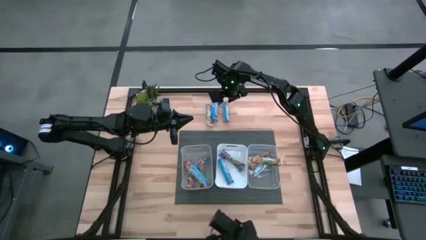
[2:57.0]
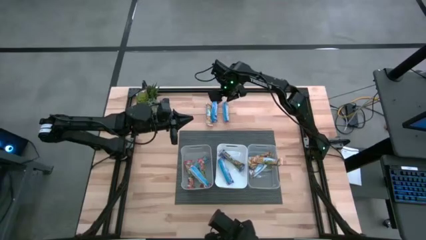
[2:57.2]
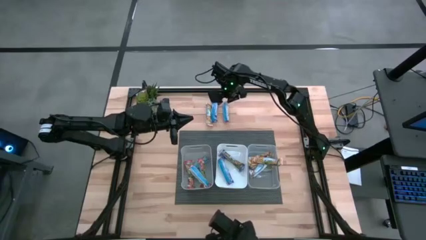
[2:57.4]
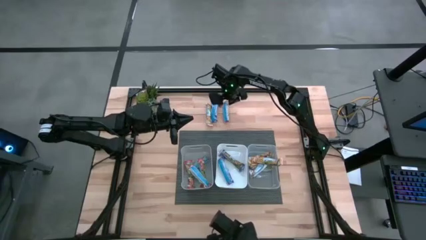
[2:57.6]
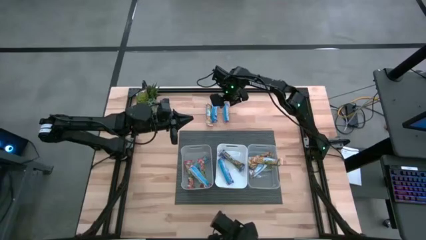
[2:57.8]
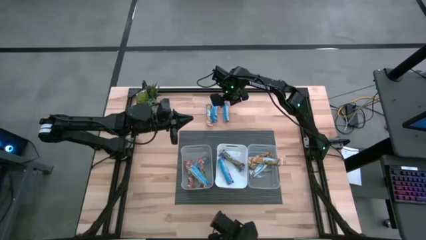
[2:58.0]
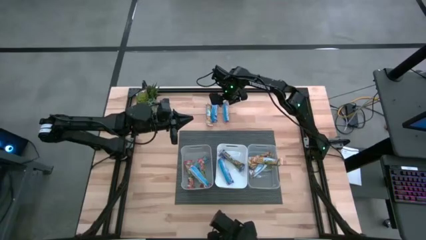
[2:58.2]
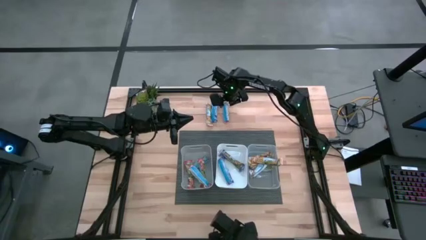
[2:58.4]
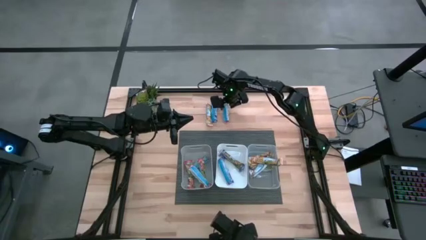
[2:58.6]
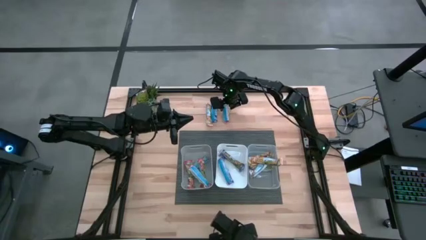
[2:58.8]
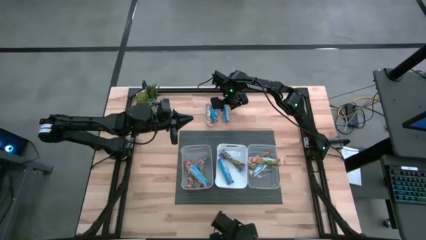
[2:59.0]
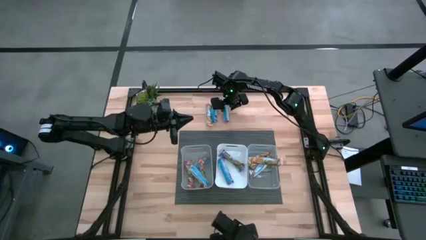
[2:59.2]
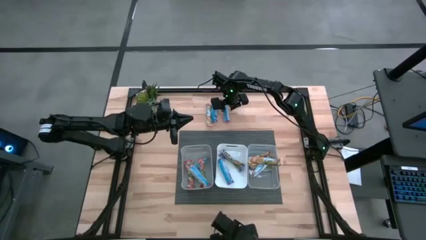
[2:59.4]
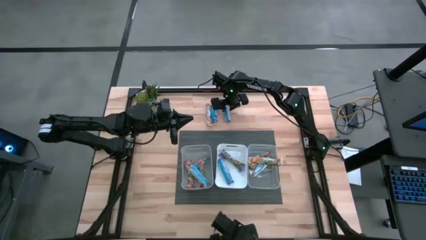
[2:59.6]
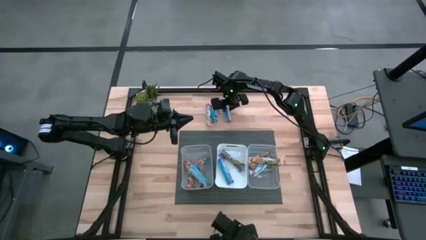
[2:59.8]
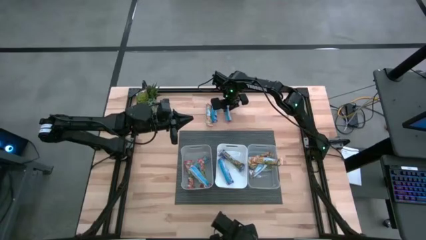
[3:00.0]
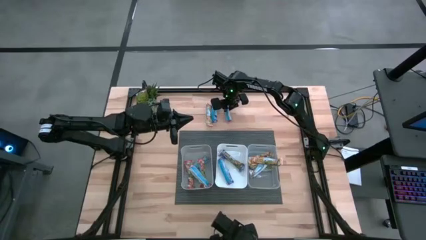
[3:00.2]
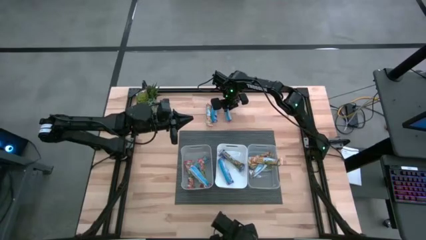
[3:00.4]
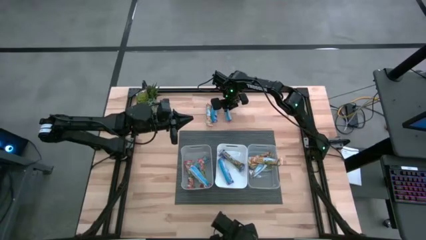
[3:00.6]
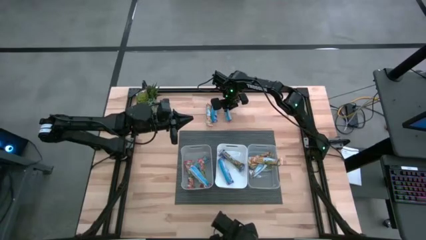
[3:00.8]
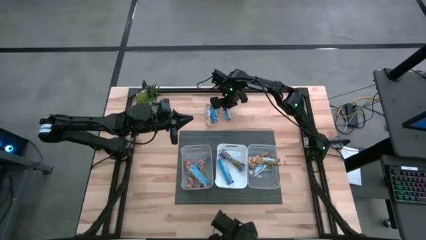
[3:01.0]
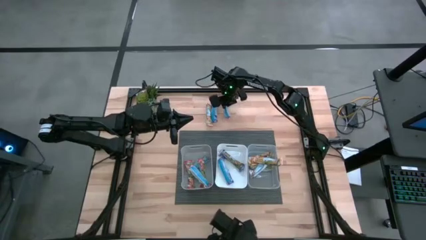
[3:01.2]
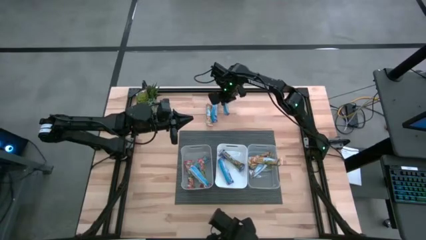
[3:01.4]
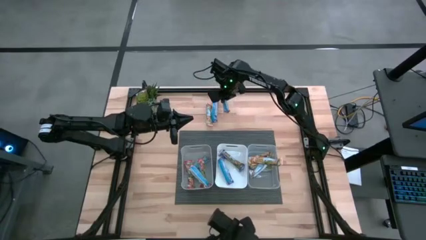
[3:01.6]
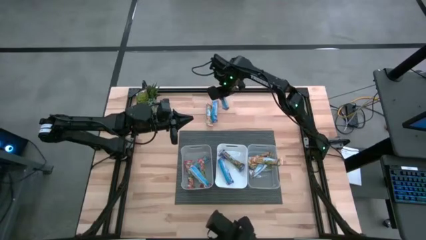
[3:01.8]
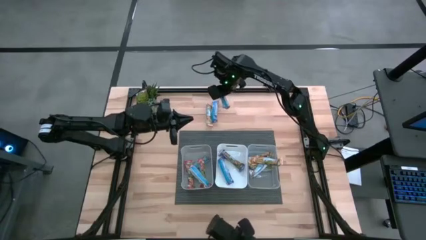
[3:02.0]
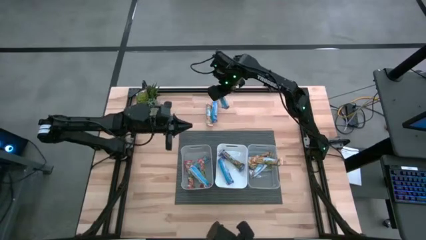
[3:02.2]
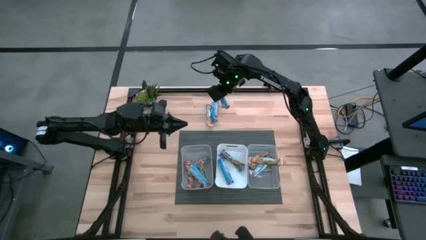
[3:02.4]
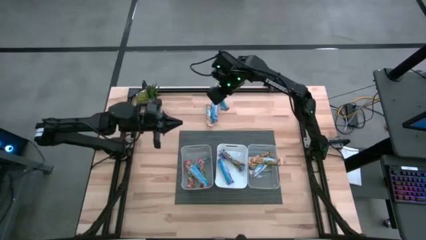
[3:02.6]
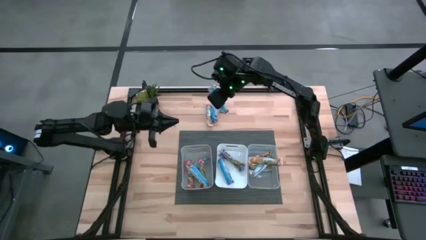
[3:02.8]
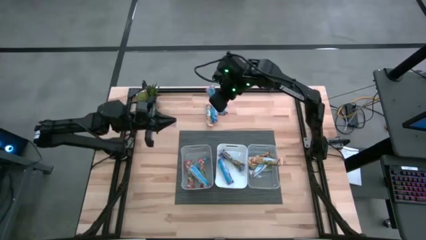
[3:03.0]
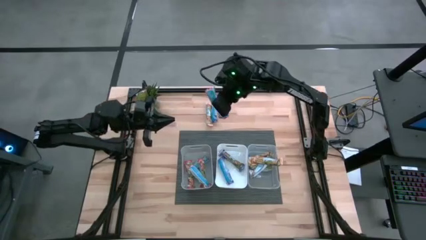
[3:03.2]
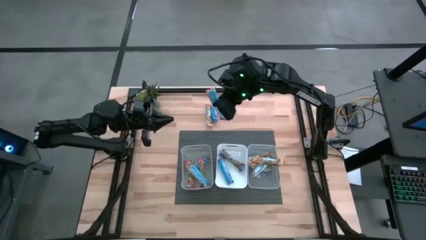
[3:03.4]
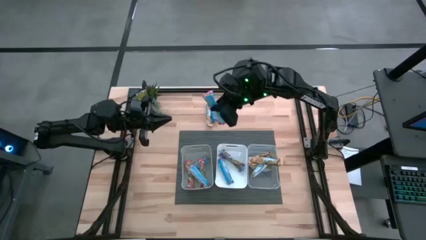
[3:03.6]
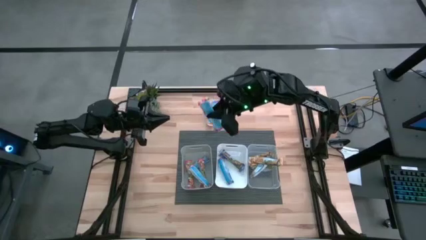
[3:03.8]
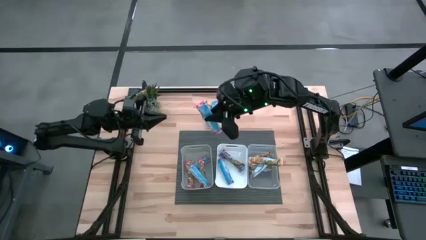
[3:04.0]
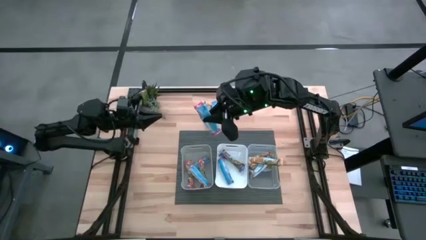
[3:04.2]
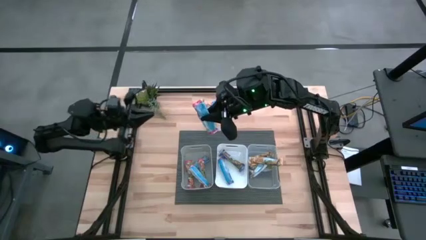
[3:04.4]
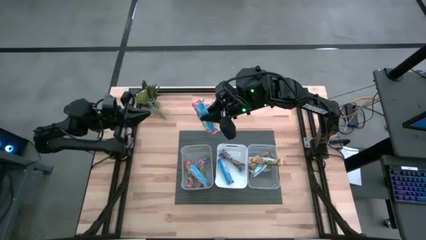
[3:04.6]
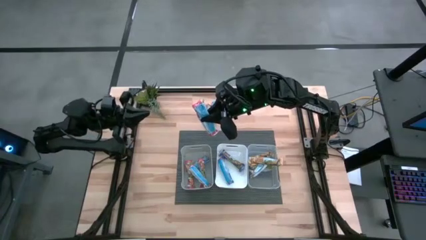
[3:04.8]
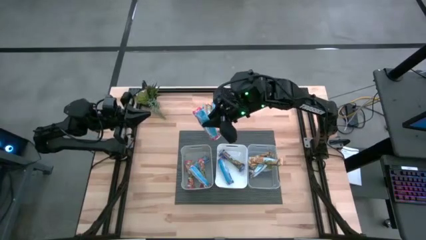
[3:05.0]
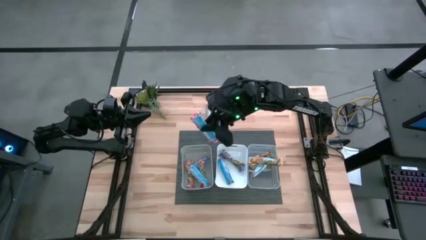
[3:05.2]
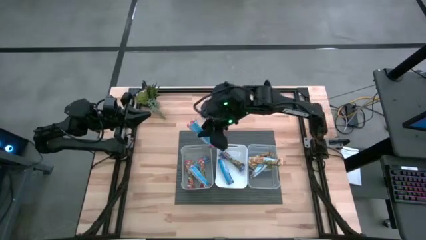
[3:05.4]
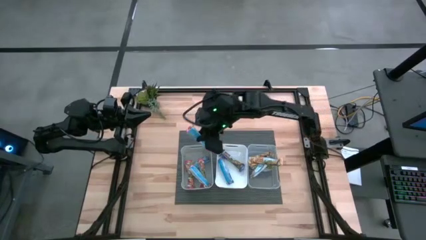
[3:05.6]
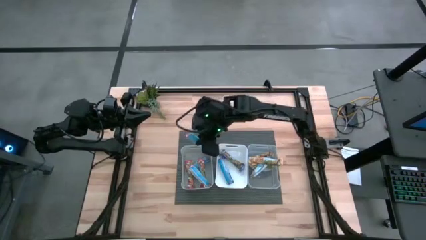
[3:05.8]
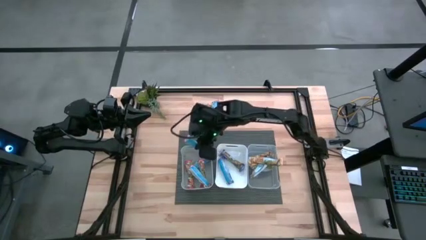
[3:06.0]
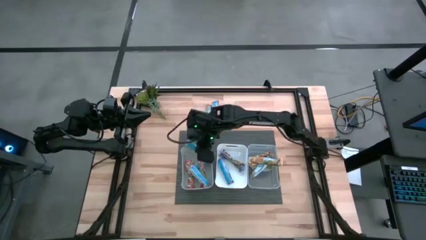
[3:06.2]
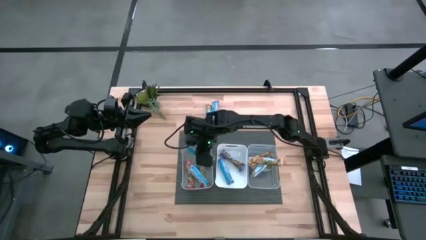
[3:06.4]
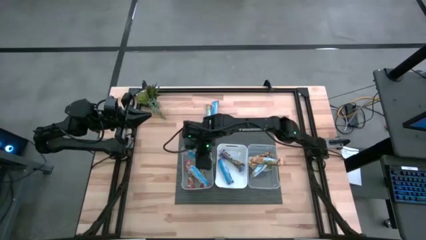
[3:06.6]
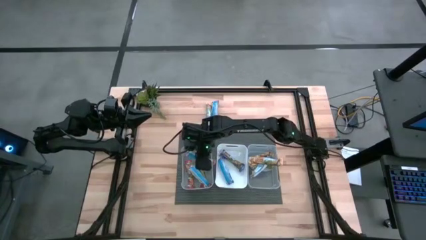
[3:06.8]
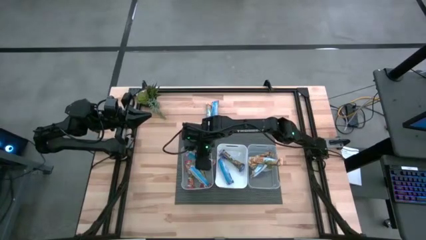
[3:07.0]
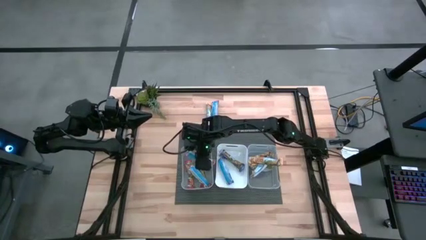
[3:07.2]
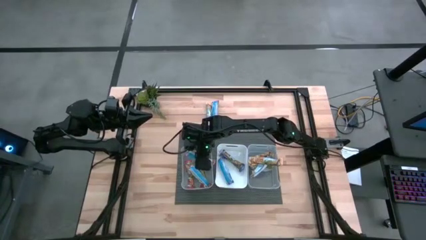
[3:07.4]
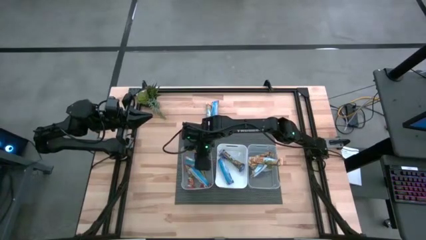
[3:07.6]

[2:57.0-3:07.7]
Task: Pick and place Granola Bars by type
Put the red granola bar into the gray bin

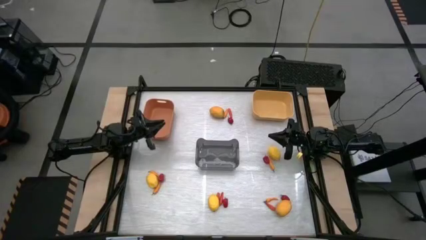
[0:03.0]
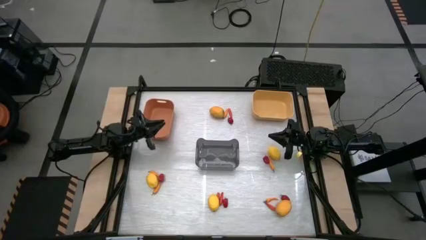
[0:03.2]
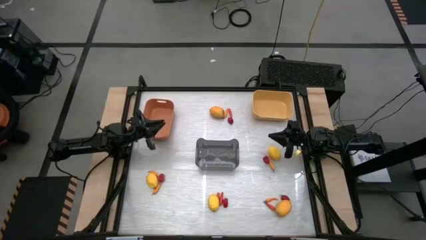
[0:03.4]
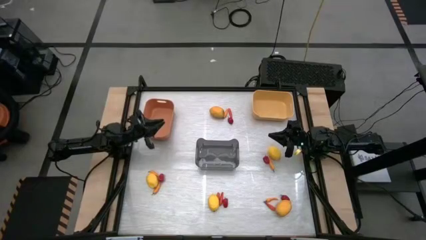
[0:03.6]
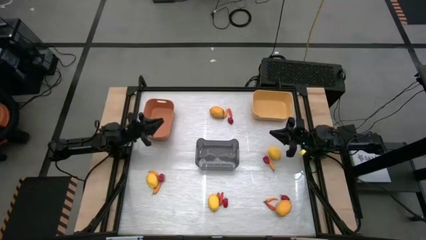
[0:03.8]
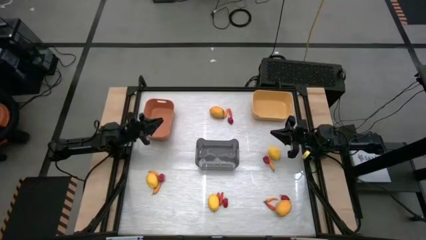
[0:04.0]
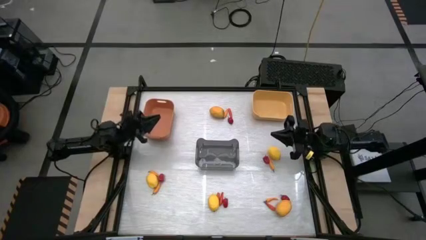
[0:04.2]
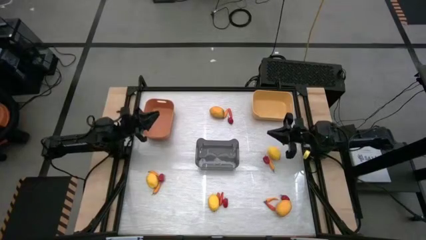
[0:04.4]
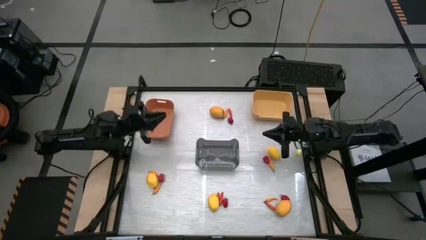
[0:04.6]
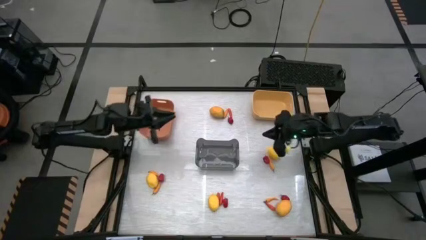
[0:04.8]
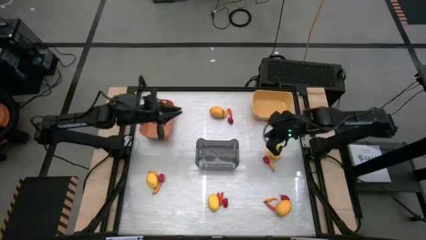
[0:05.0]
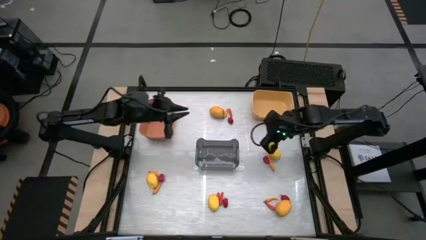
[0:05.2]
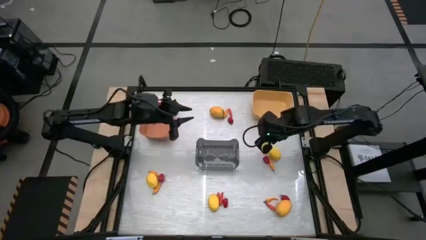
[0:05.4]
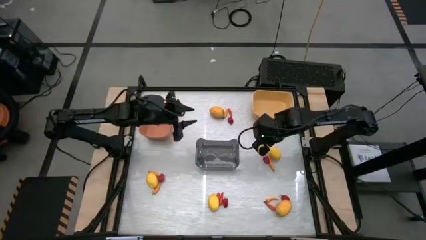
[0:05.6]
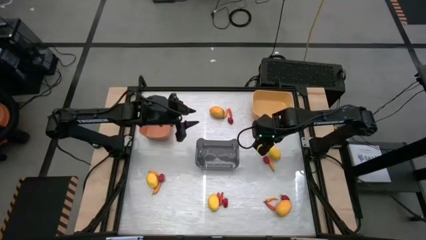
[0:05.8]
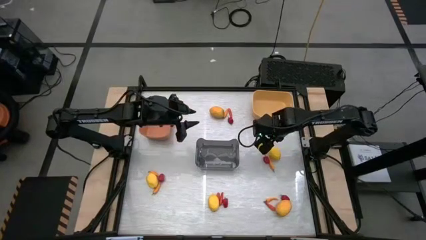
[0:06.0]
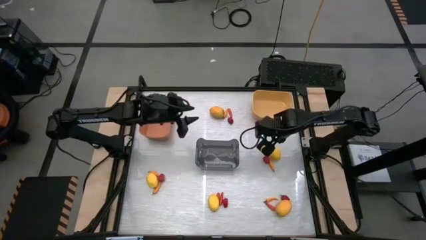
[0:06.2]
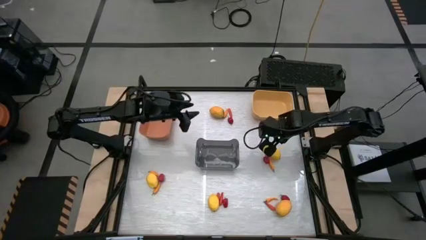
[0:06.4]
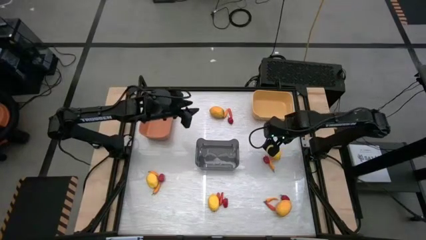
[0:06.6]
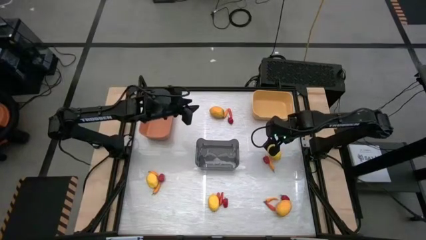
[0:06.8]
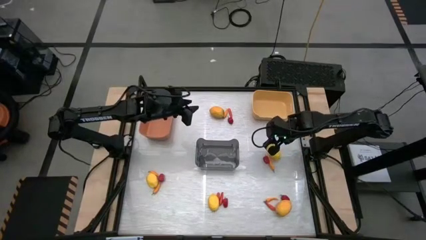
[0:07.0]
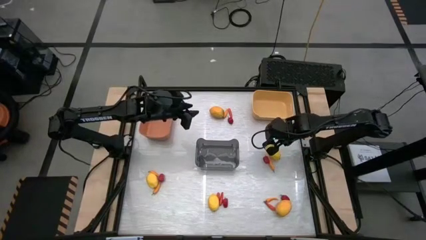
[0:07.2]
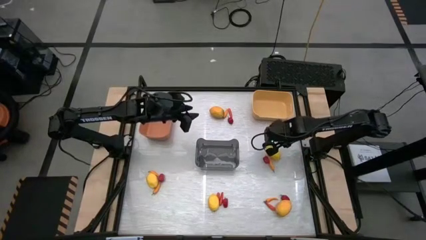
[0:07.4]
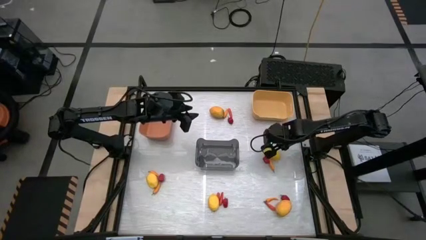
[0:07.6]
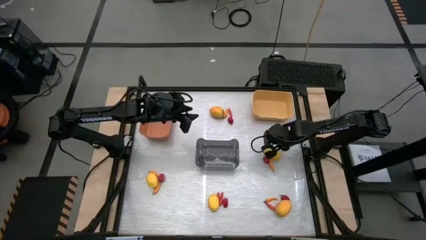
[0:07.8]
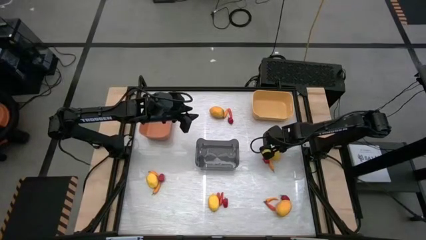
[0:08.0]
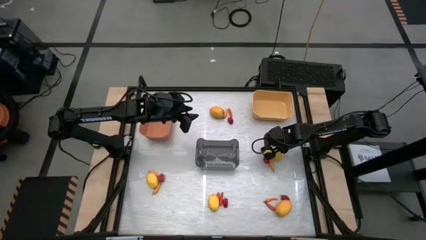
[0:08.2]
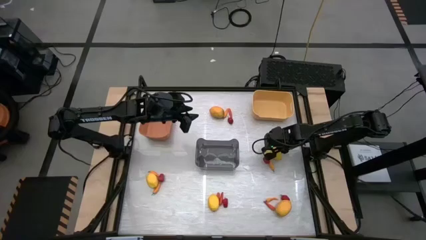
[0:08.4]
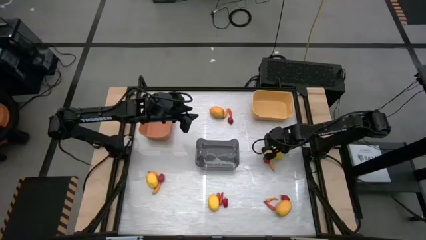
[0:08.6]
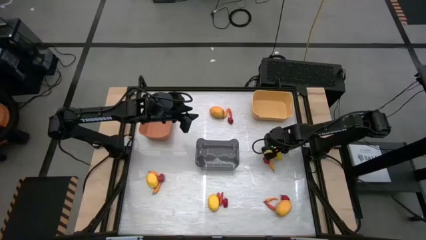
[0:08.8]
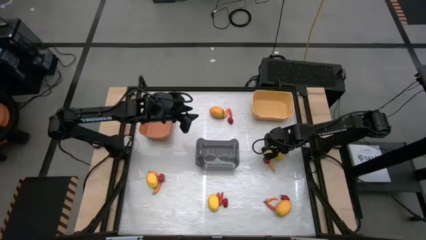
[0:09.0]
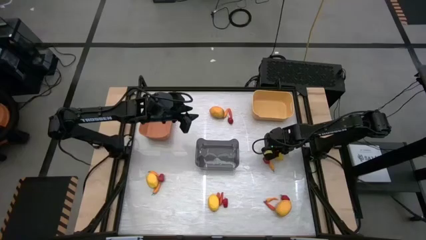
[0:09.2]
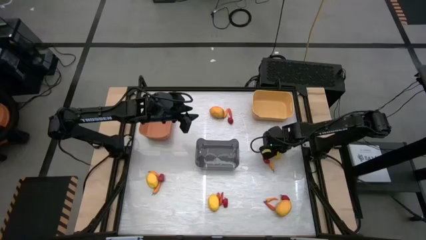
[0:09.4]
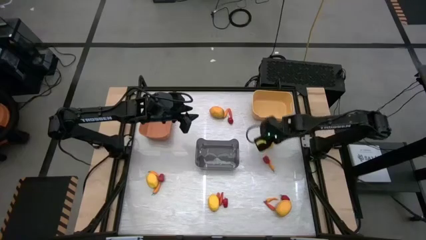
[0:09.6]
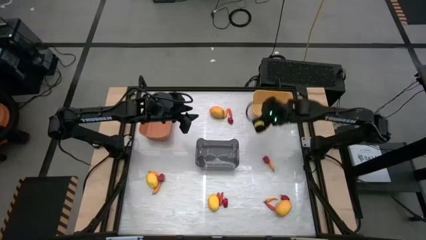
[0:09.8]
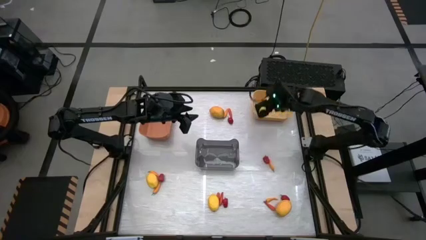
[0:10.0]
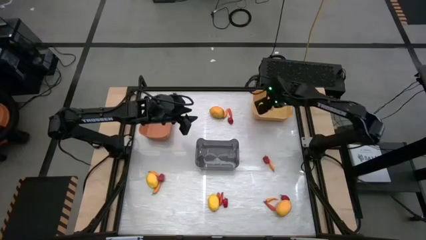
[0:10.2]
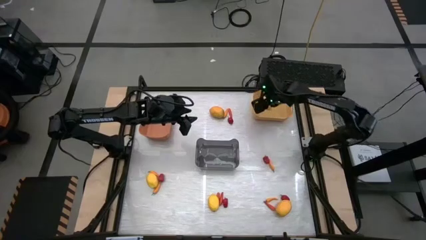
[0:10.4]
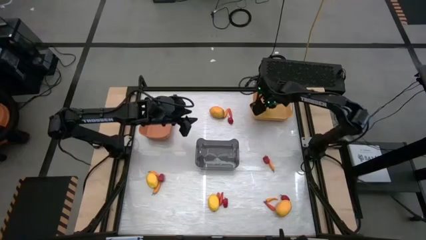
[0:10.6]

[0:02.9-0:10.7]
Task: Sort produce into baskets
Put the yellow lemon into the yellow bin
